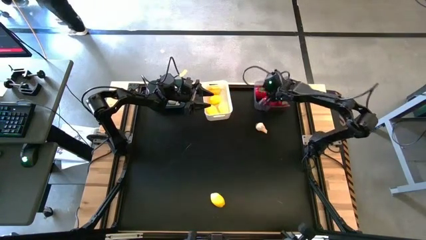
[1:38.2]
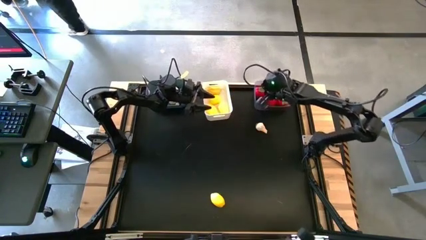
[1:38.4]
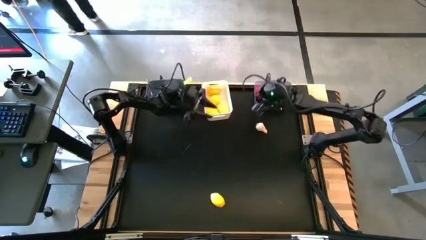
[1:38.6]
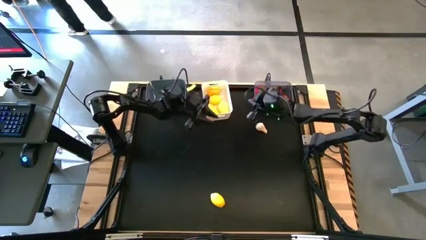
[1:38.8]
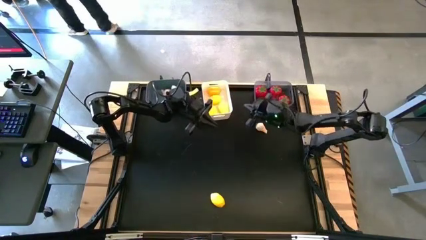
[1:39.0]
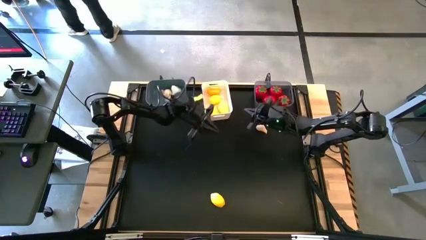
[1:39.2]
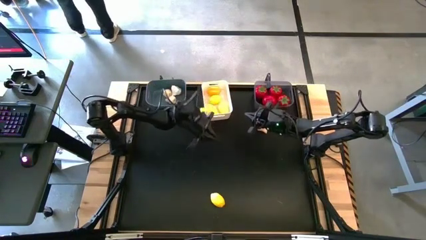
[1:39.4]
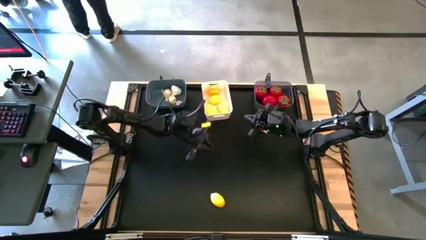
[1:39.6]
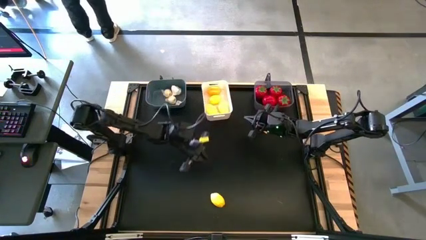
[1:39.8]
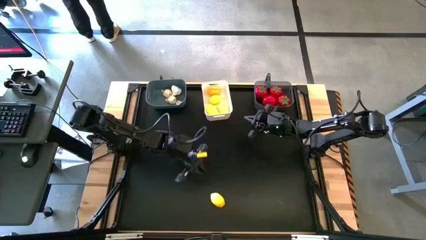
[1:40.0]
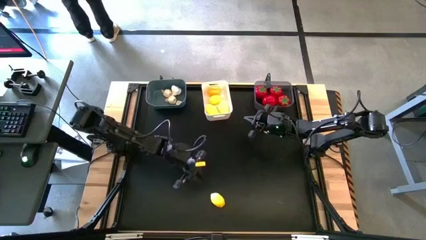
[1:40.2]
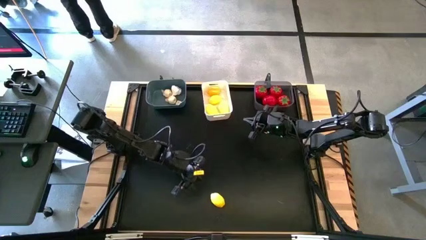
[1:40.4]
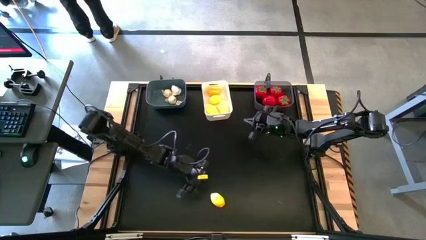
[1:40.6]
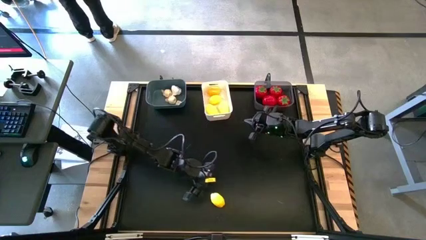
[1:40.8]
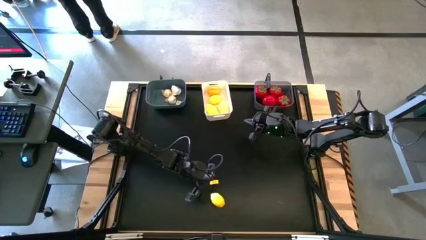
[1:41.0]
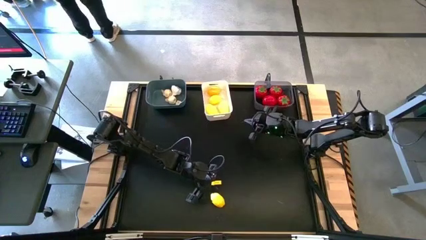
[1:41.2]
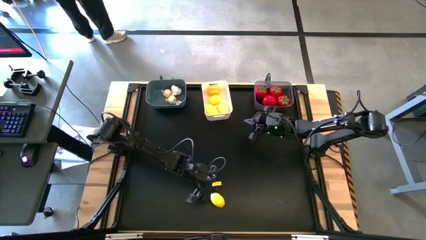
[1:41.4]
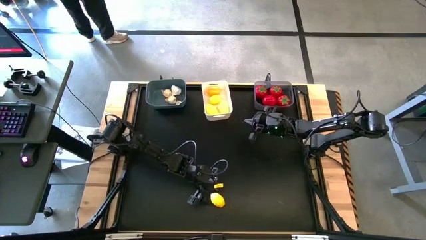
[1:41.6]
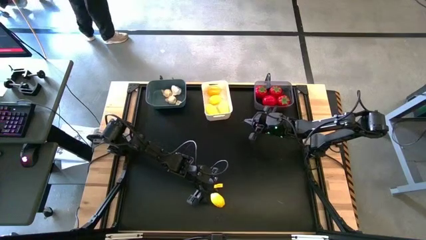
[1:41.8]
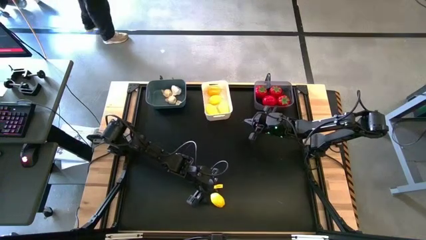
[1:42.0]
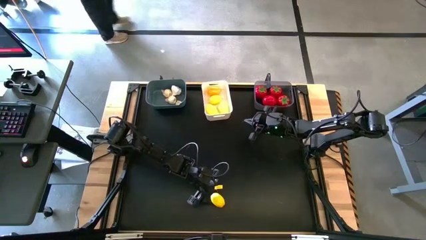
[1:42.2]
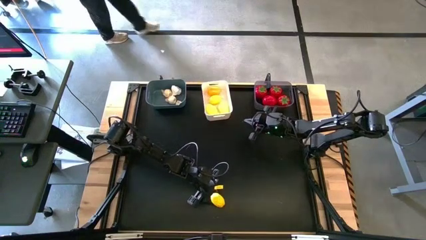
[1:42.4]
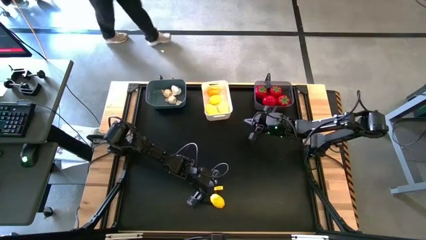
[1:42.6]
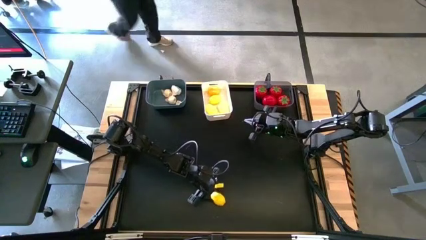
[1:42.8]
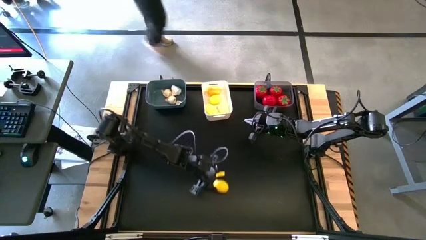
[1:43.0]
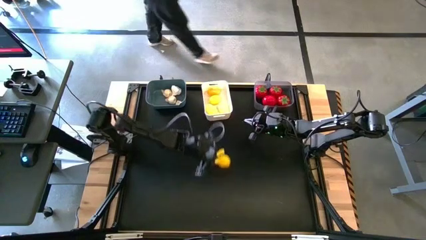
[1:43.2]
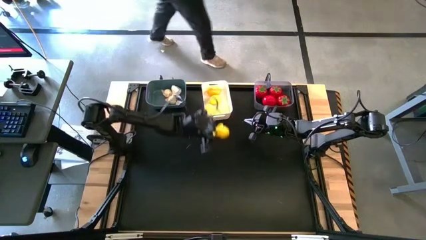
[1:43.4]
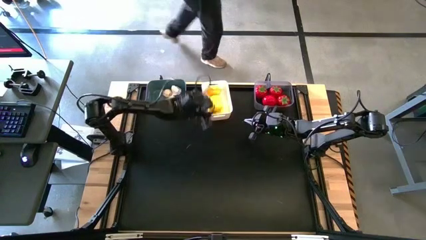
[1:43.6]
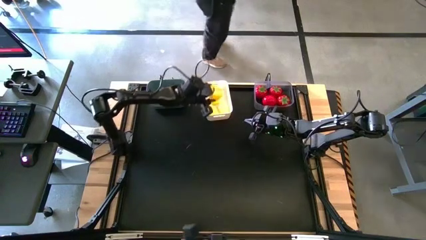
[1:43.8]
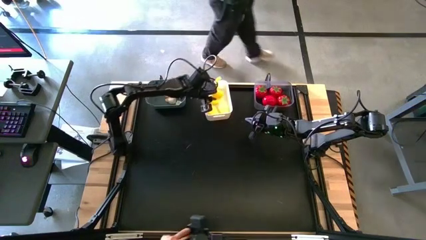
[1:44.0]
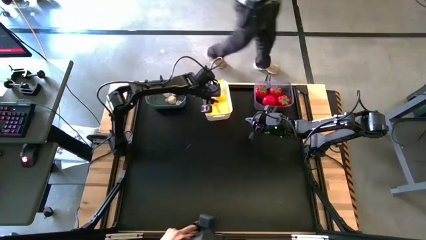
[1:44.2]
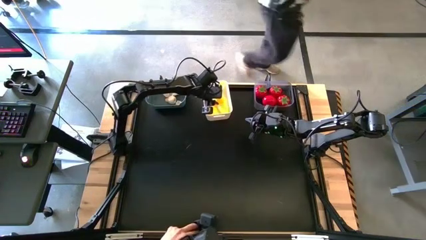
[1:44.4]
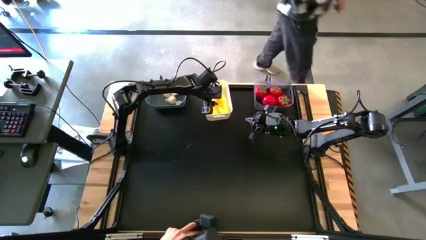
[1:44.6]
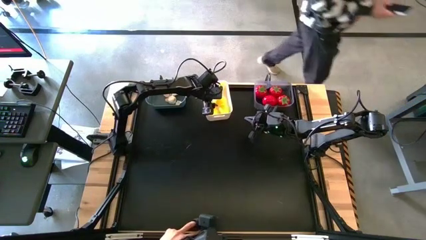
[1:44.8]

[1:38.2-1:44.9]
Task: Sort produce into baskets
Put the yellow lemon into the white bin

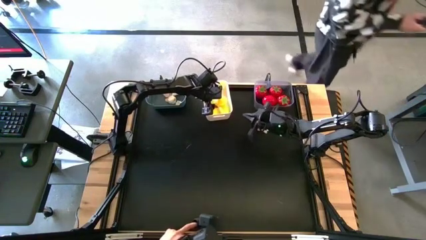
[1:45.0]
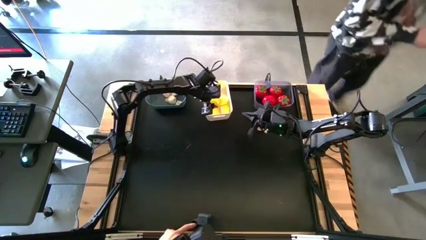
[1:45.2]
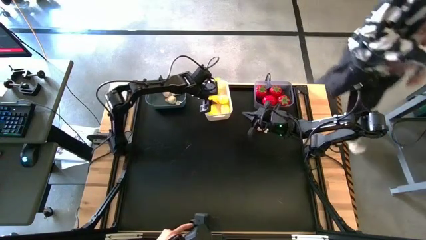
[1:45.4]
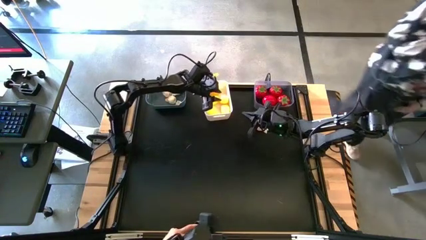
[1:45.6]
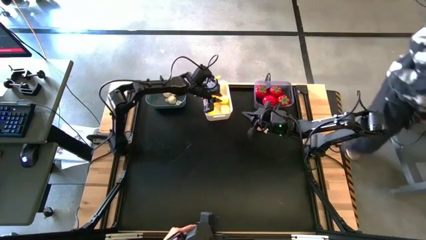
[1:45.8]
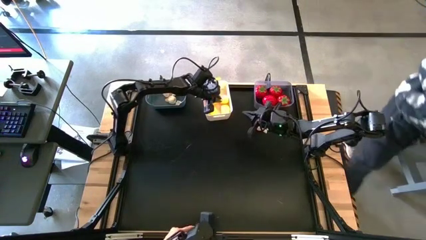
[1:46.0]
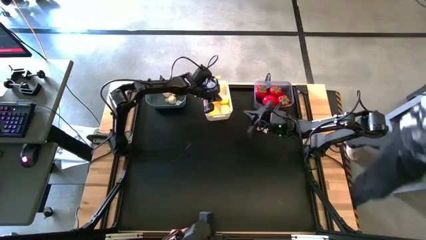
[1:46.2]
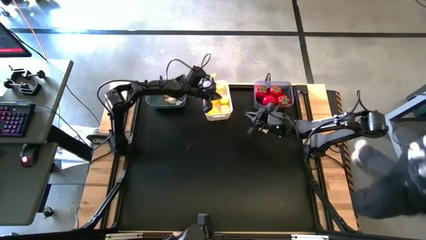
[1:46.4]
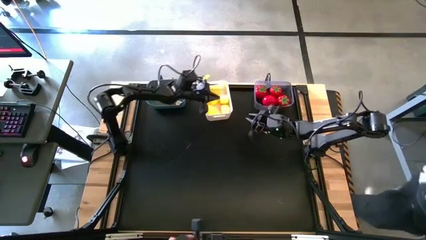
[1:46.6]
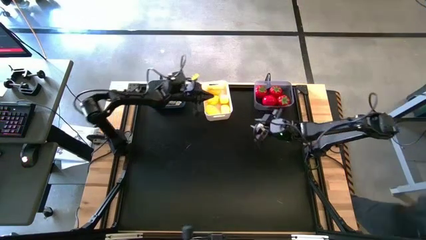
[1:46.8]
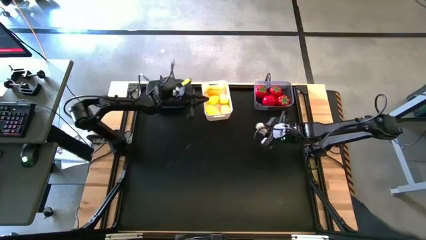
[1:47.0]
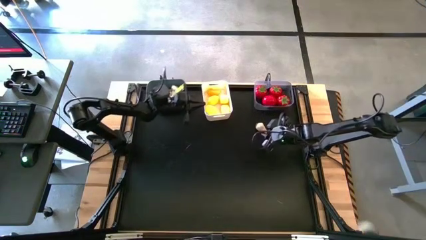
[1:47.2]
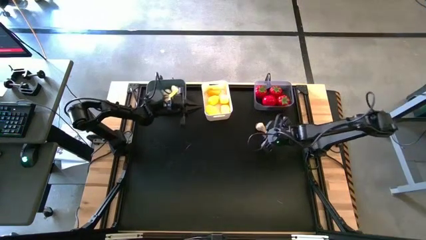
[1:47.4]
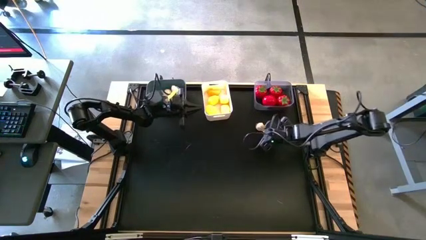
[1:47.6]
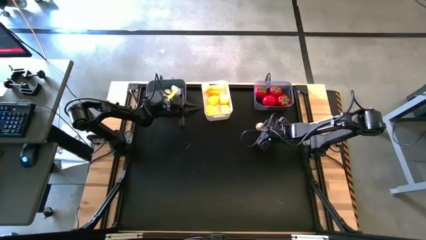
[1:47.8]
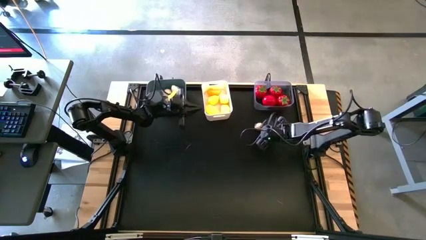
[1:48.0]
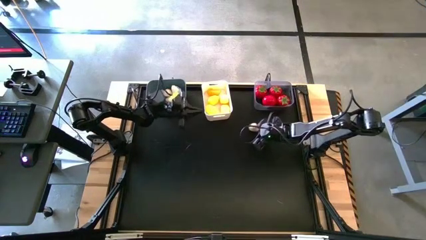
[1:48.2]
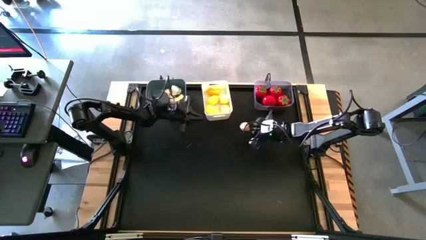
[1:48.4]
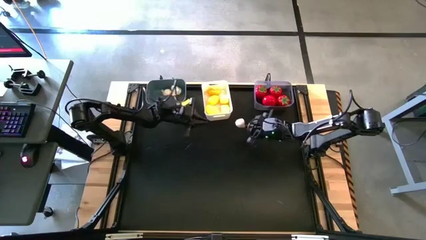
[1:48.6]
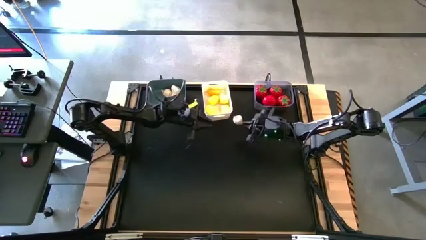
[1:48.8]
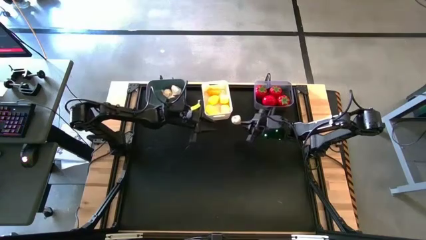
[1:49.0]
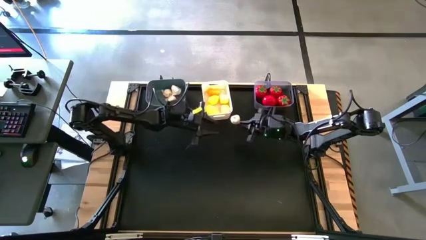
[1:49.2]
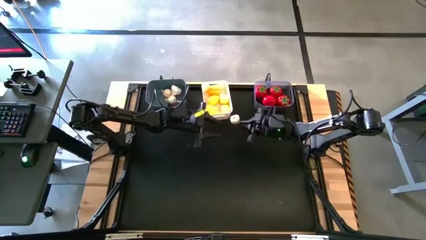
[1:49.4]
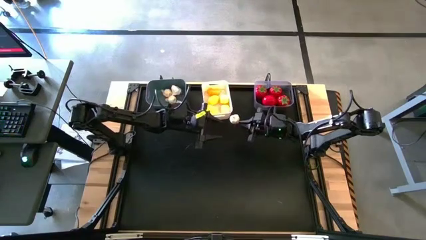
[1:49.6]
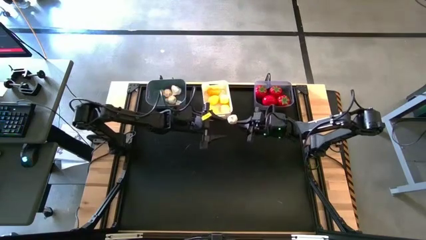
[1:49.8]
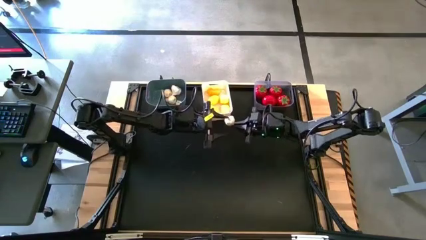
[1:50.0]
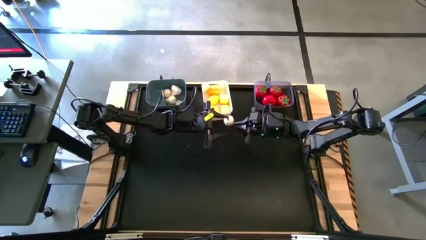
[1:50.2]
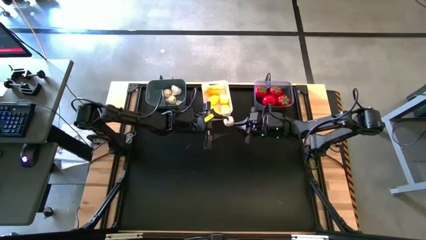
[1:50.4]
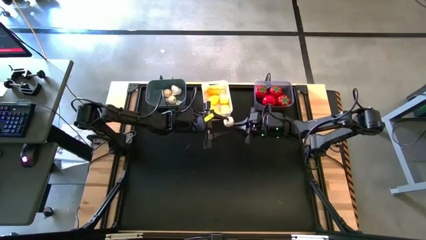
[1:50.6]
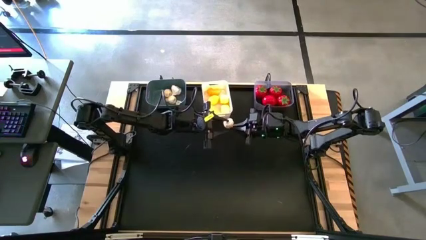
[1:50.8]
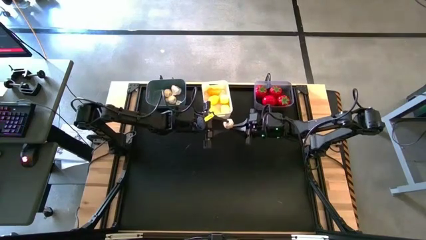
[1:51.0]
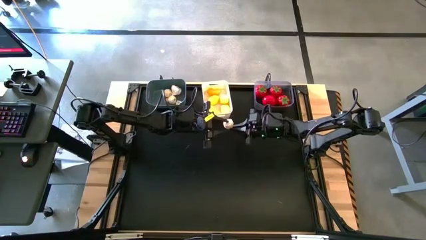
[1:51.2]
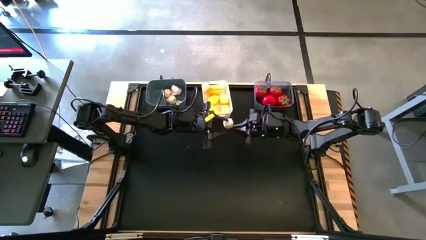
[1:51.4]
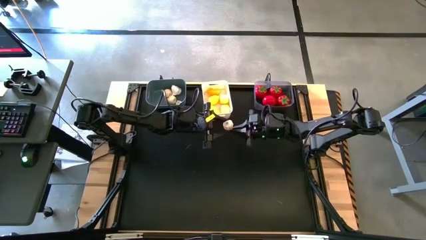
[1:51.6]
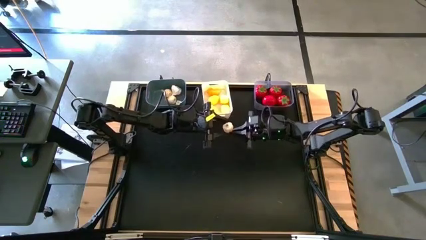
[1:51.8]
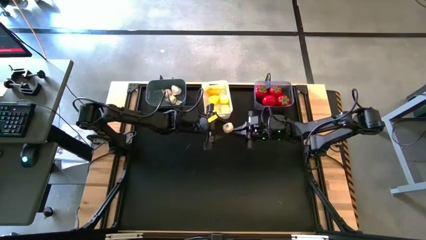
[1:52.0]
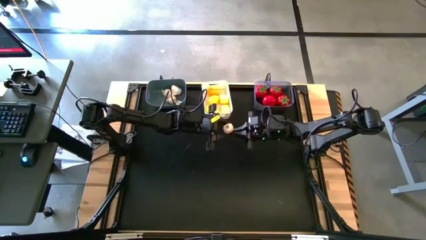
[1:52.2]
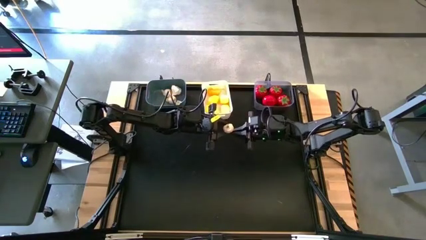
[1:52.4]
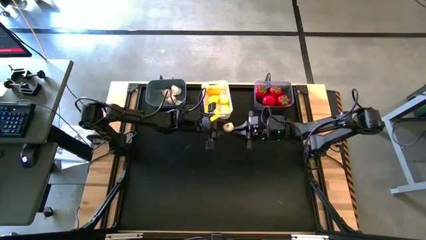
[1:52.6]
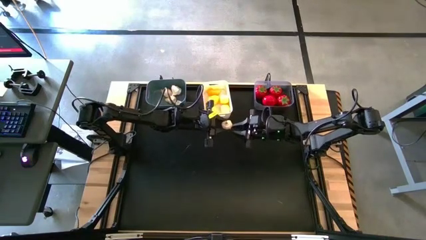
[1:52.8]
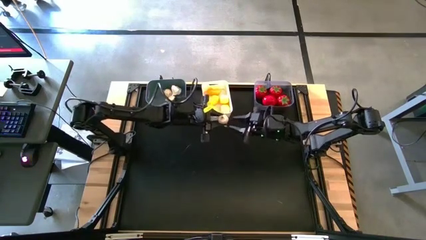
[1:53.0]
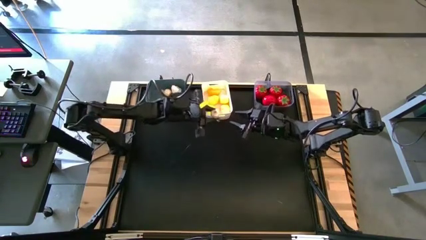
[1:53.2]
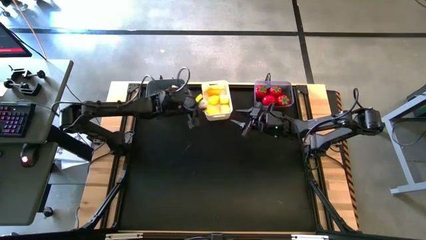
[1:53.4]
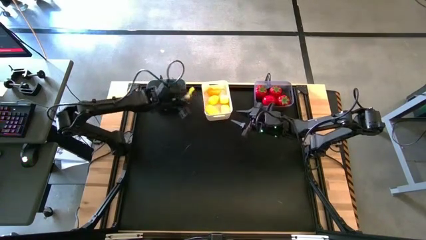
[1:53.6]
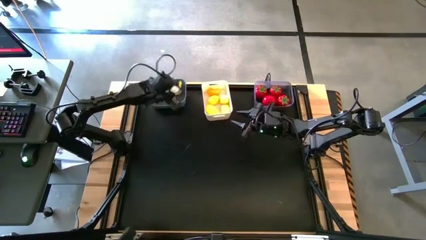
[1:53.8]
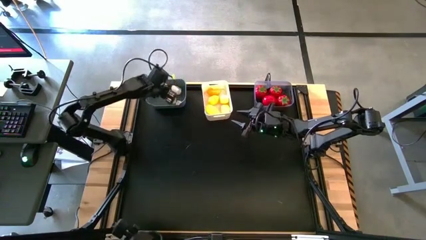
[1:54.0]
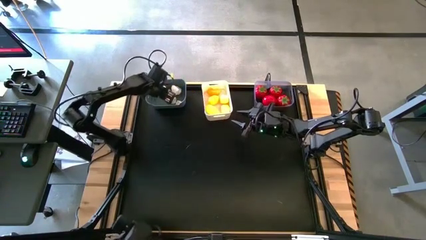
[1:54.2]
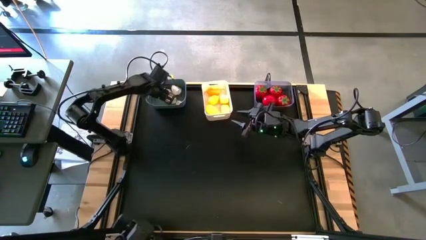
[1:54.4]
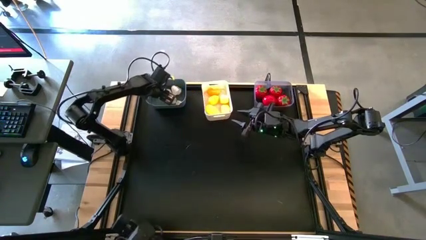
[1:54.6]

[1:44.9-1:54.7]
Put the white garlic into the blue bin

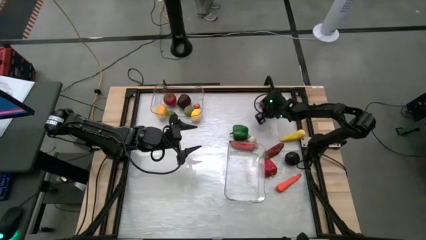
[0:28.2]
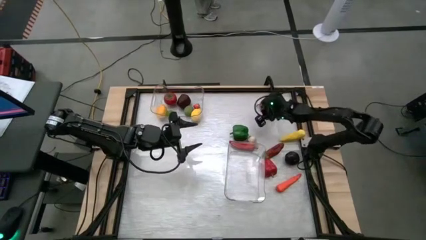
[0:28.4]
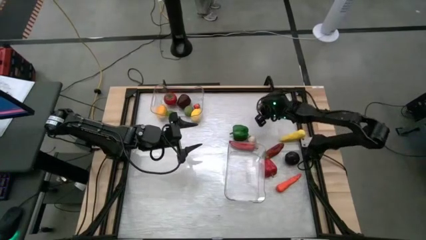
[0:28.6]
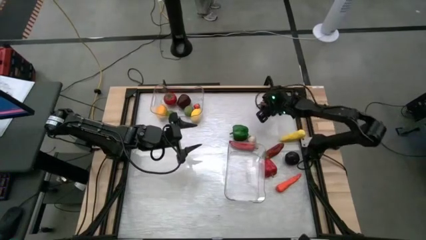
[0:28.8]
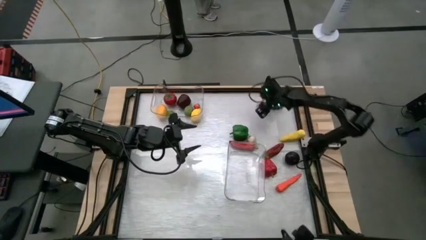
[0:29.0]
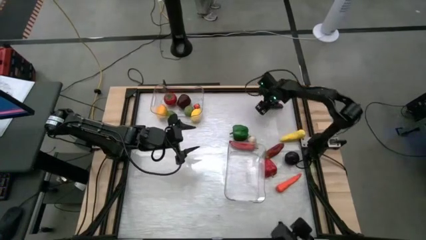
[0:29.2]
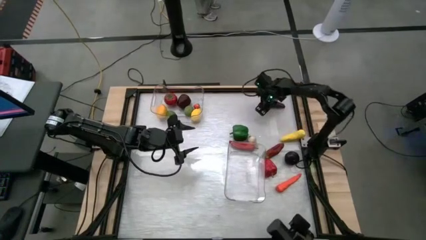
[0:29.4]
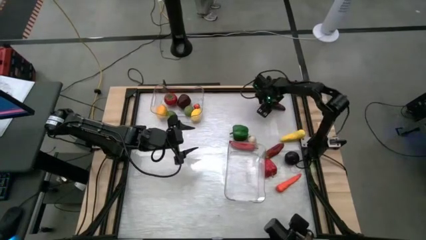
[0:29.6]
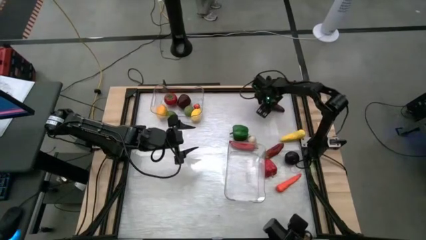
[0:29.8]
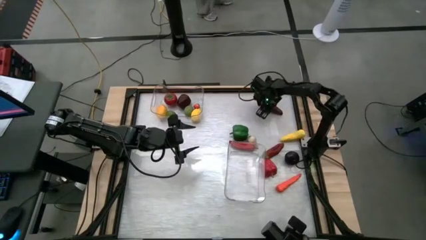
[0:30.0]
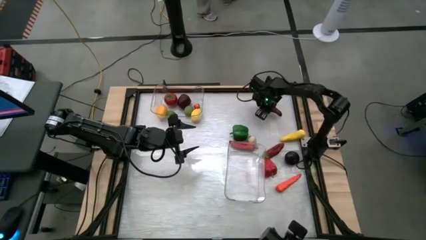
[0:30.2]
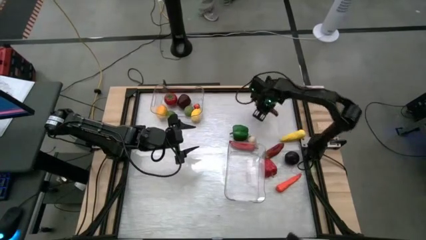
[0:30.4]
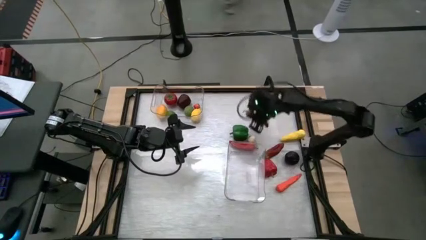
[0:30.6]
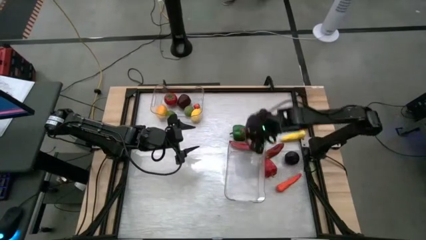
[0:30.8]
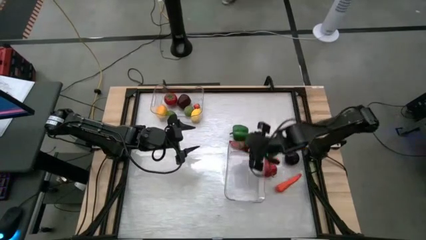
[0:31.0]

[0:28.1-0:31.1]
Task: Sort produce into baskets
Put the red chili pepper into the bottom transparent bin
